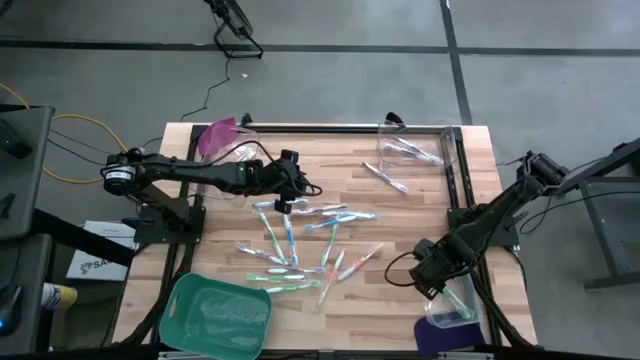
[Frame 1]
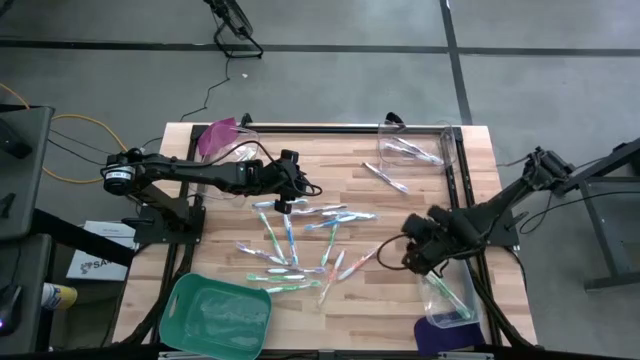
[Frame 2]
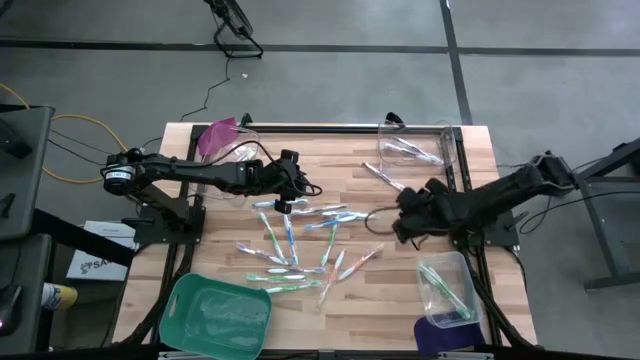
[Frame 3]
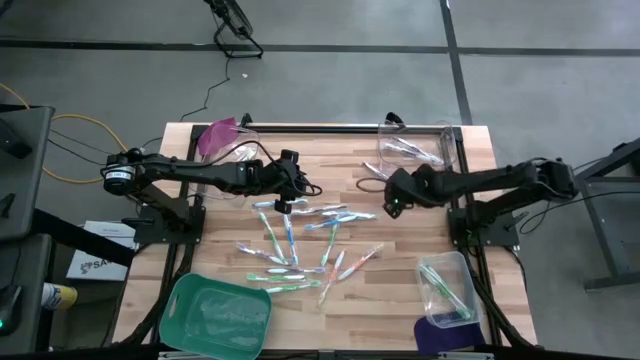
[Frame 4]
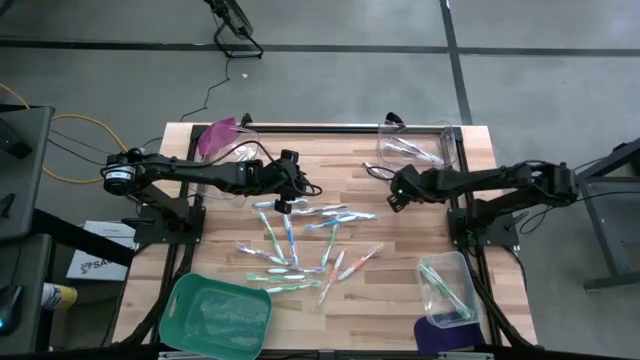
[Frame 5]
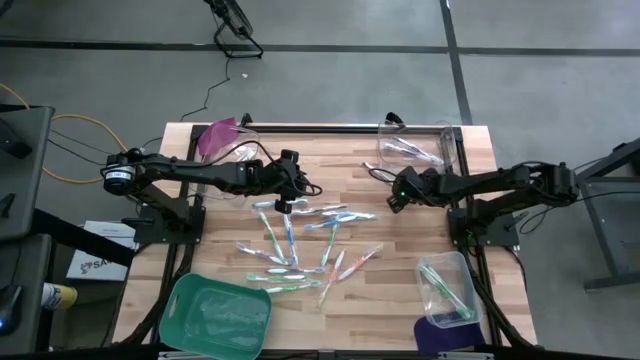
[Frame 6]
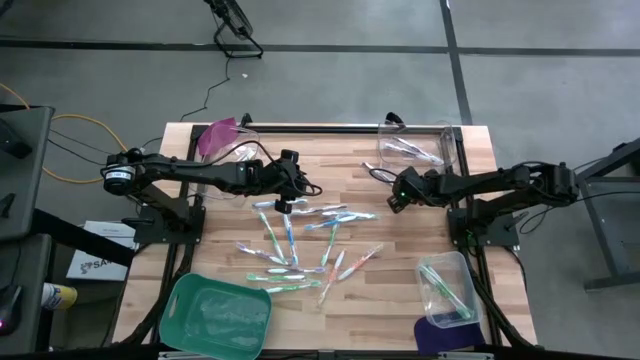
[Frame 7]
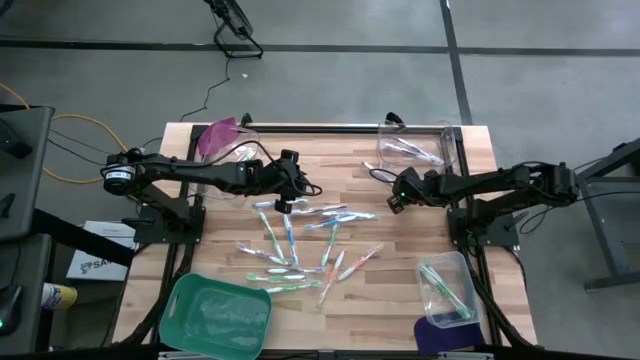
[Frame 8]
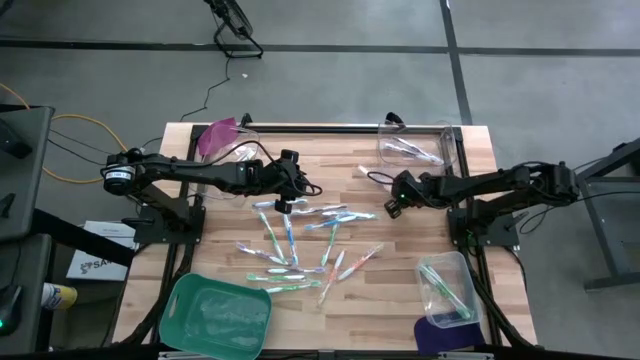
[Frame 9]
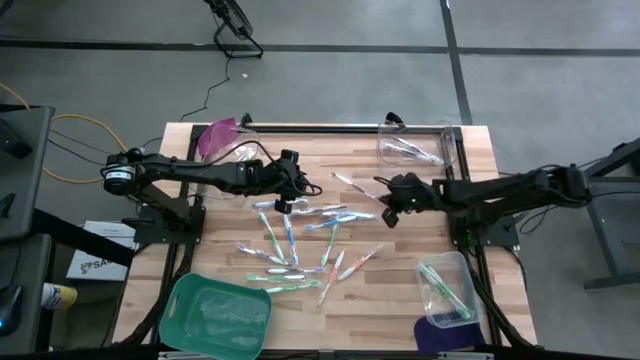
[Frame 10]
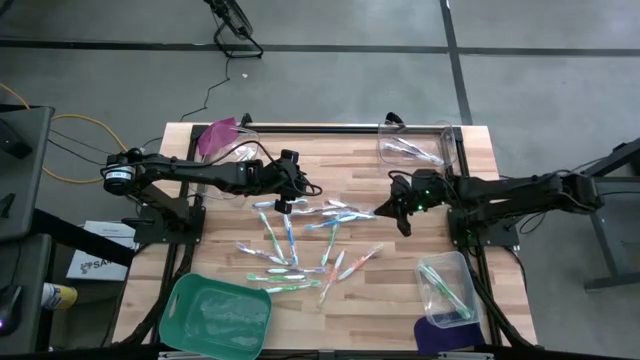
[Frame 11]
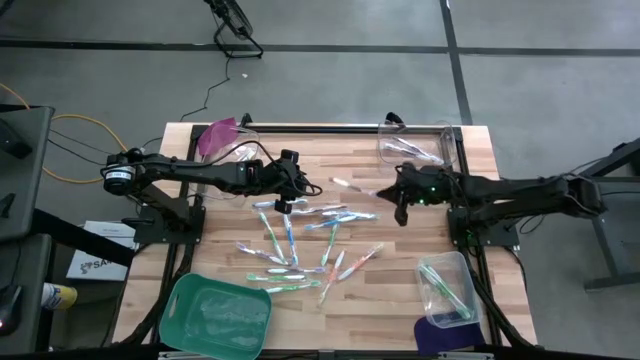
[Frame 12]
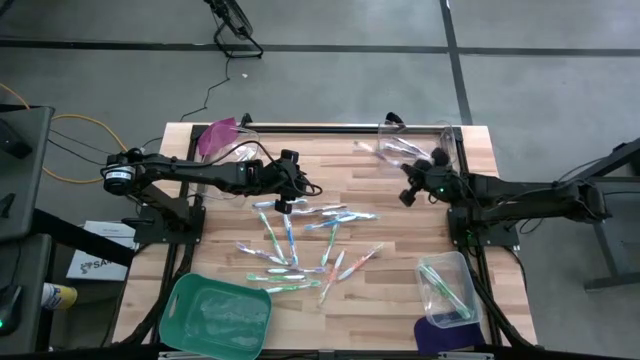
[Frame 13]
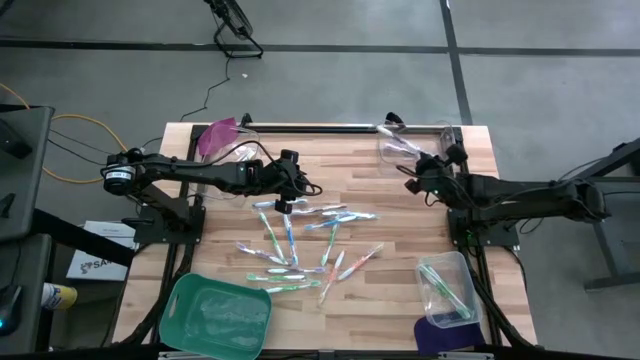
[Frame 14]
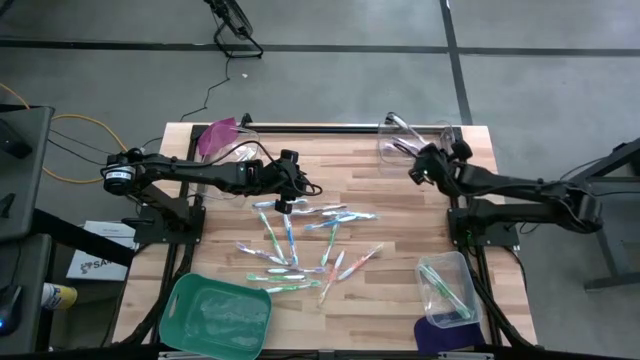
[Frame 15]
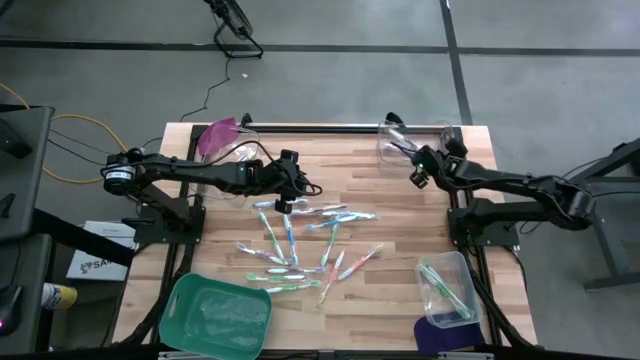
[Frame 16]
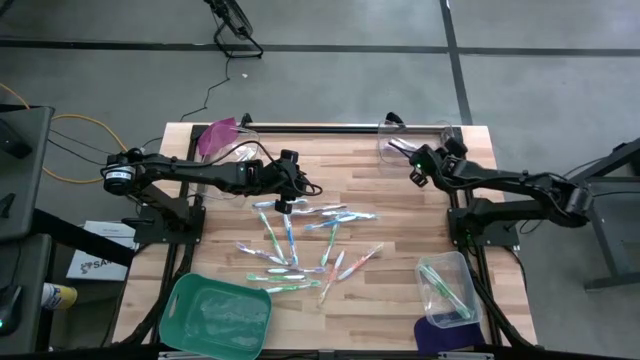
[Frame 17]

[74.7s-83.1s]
Task: Pick & Place Toothbrushes
Put the purple toothbrush into the right transparent bin

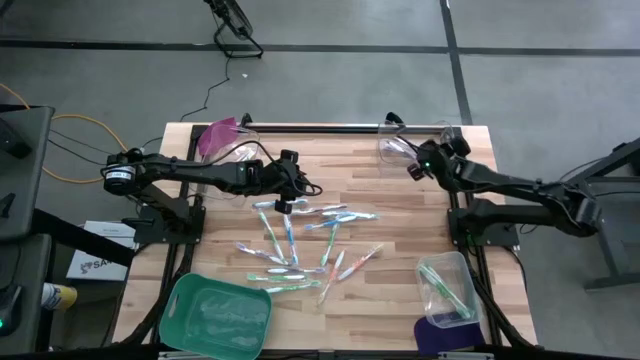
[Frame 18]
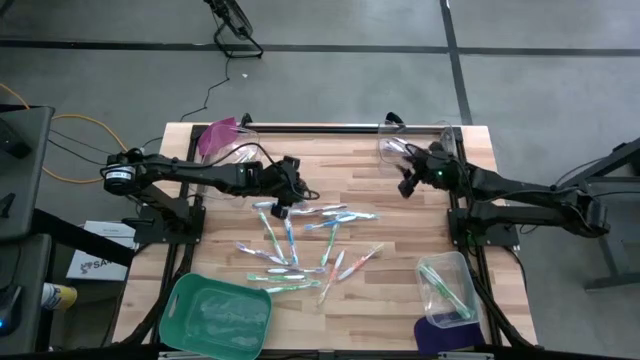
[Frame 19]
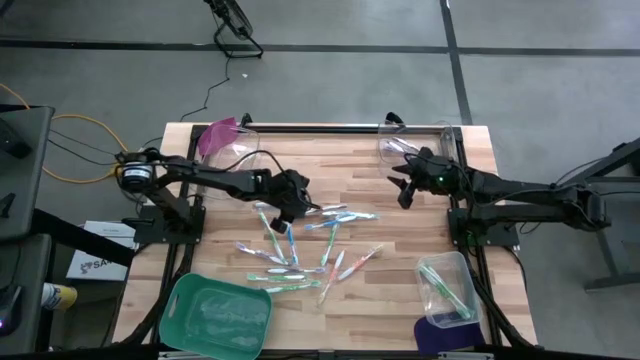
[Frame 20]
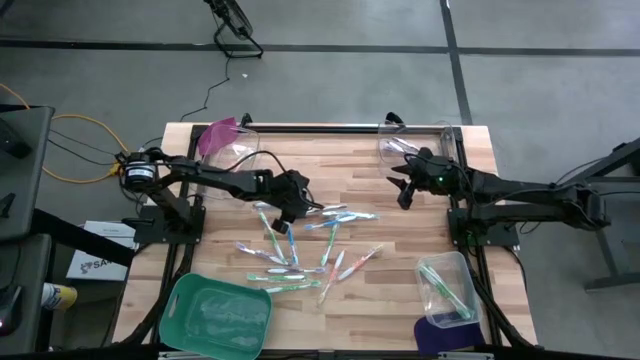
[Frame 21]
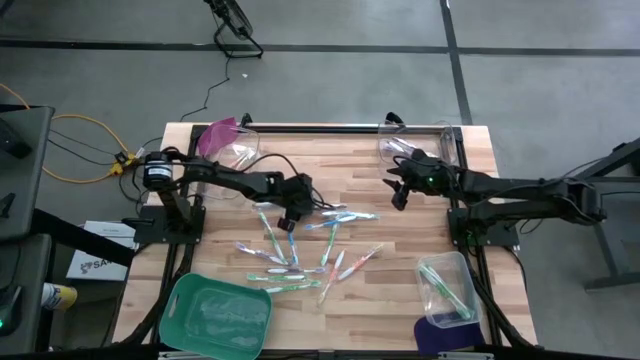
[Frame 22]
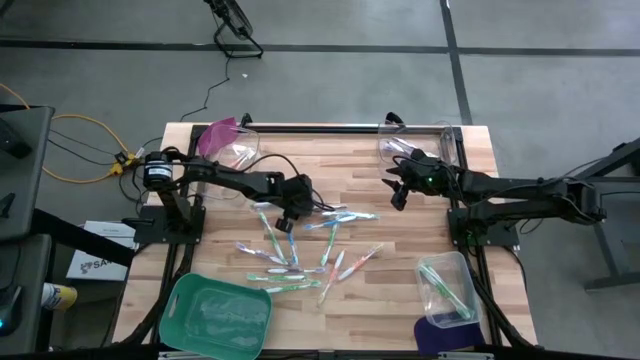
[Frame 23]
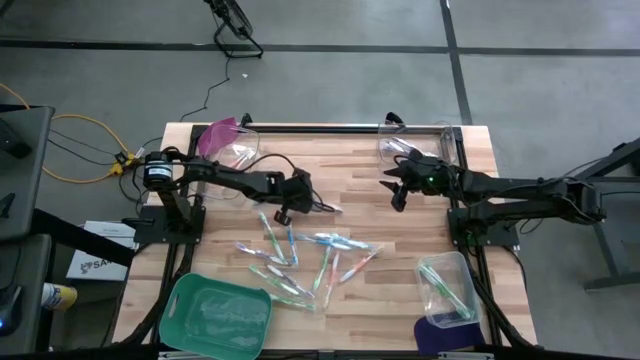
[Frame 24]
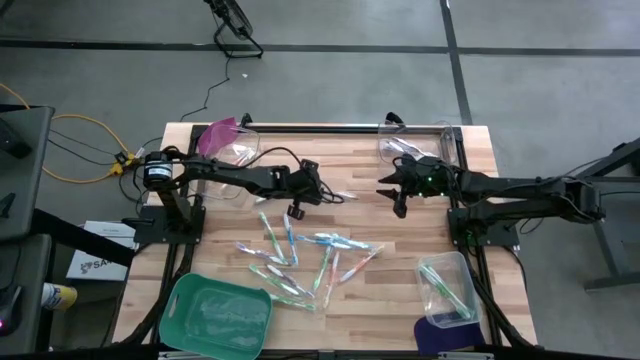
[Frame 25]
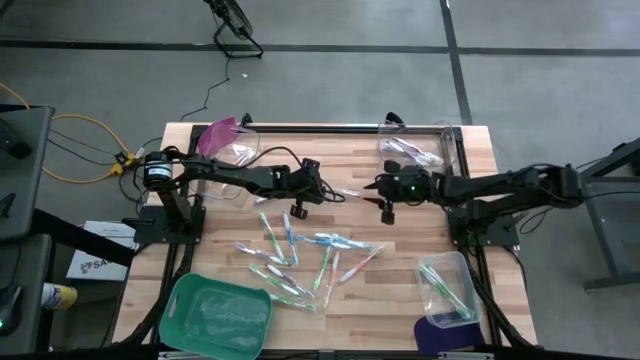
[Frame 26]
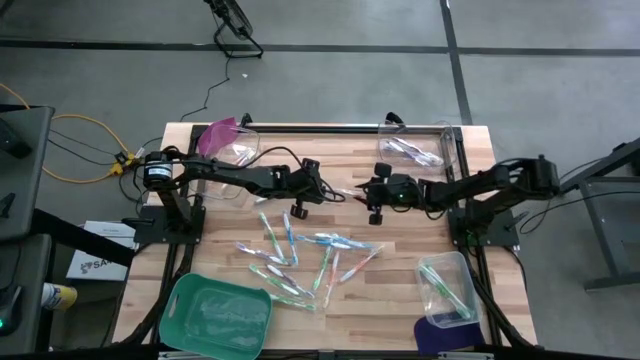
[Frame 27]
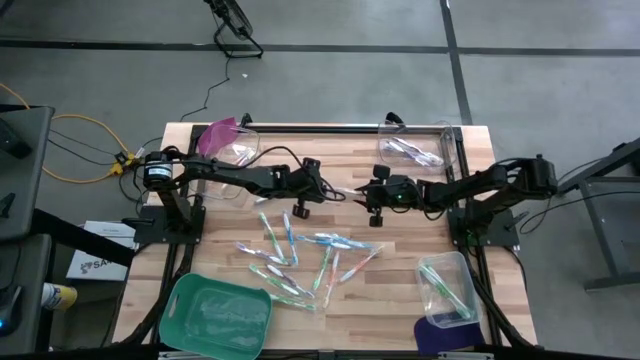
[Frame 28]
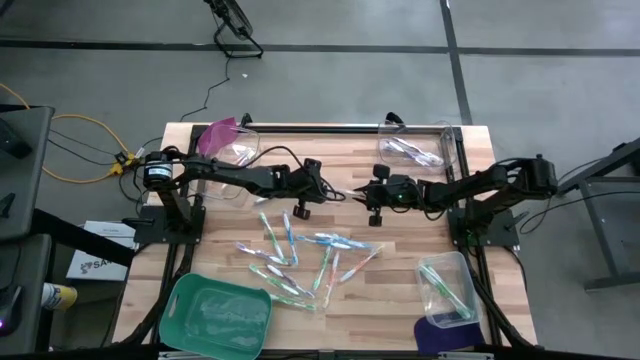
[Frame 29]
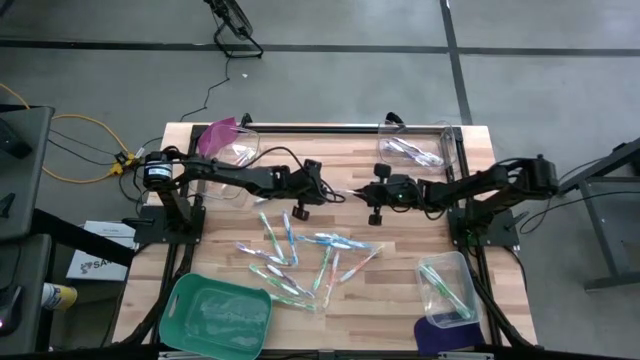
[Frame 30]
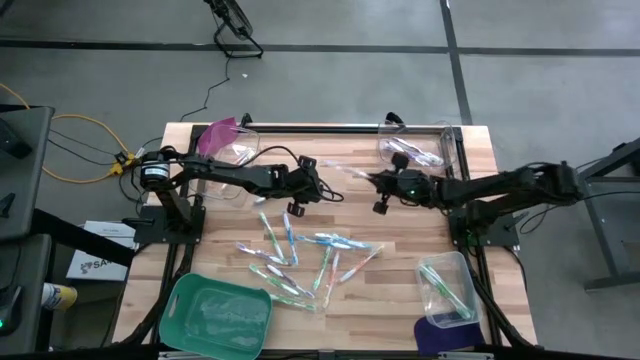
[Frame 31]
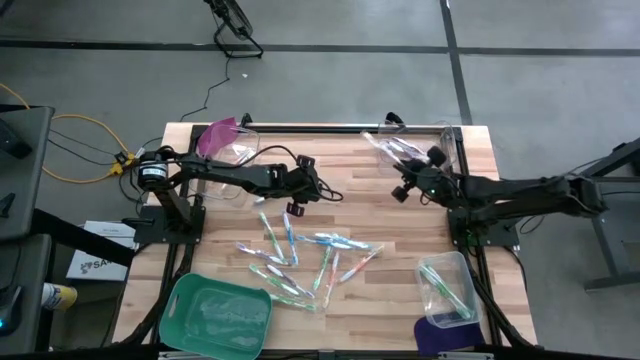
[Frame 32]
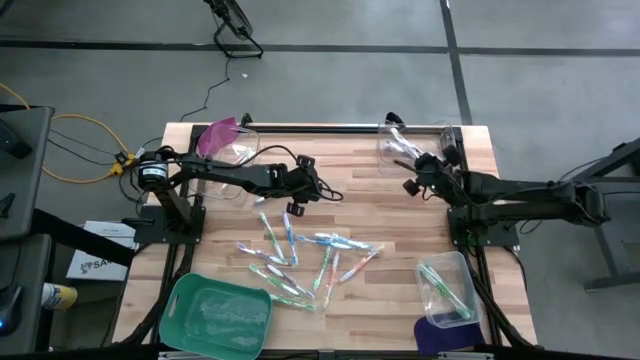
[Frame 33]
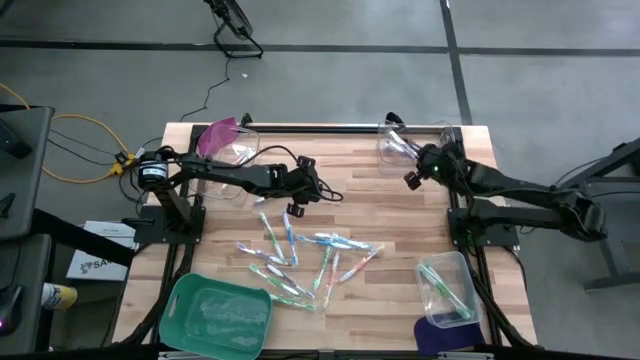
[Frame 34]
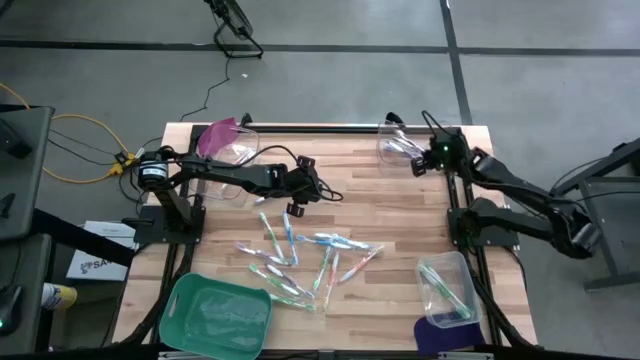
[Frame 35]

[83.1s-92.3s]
Put the purple toothbrush into the right transparent bin

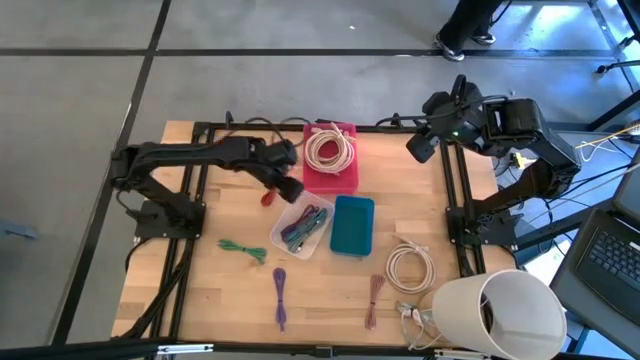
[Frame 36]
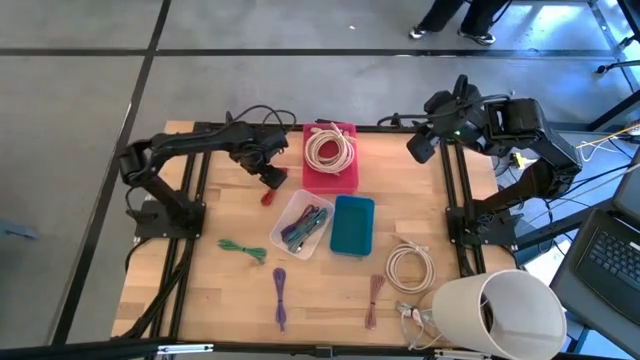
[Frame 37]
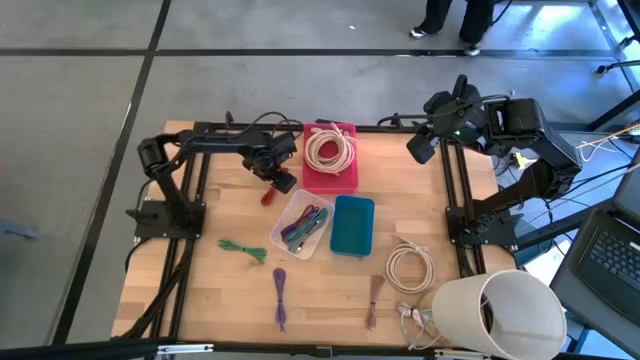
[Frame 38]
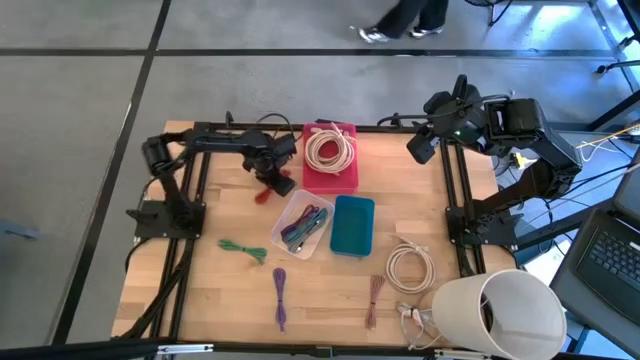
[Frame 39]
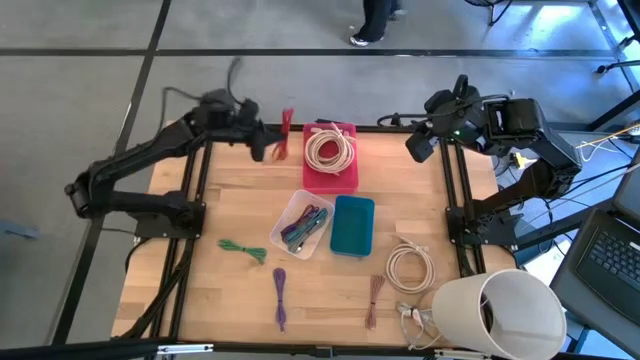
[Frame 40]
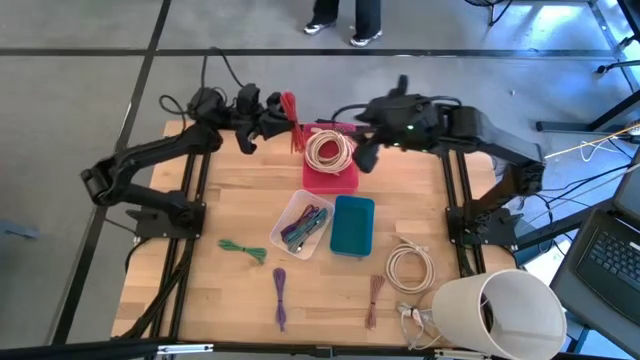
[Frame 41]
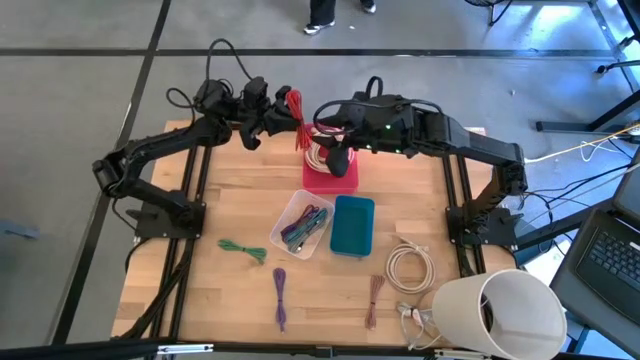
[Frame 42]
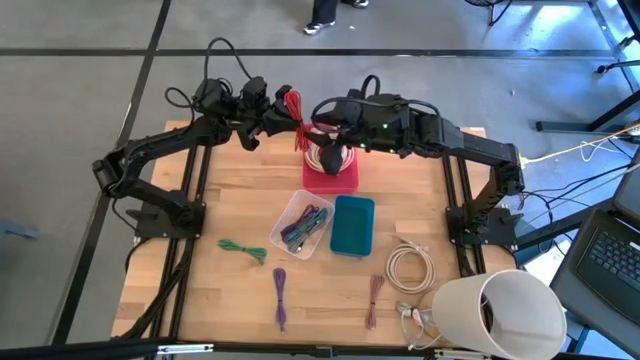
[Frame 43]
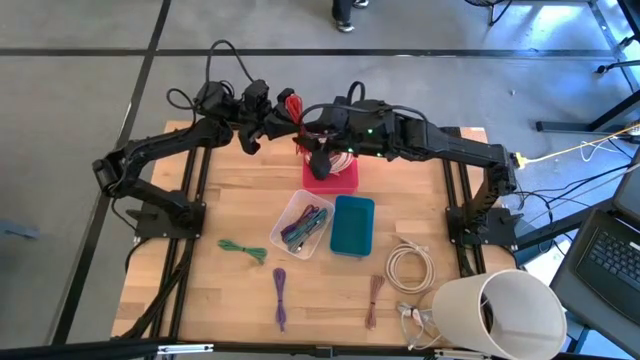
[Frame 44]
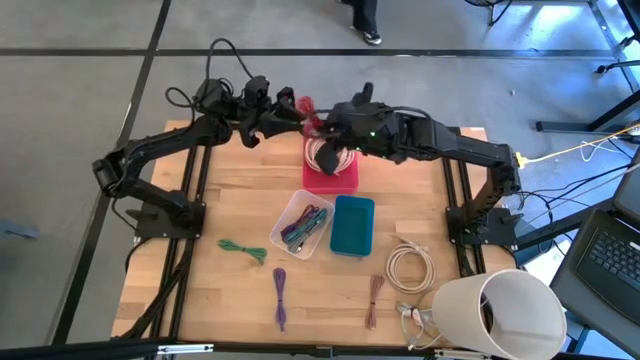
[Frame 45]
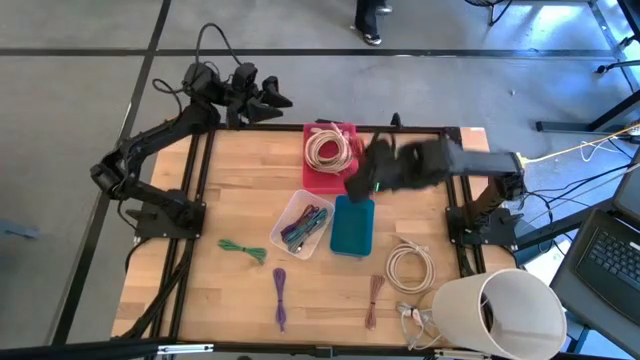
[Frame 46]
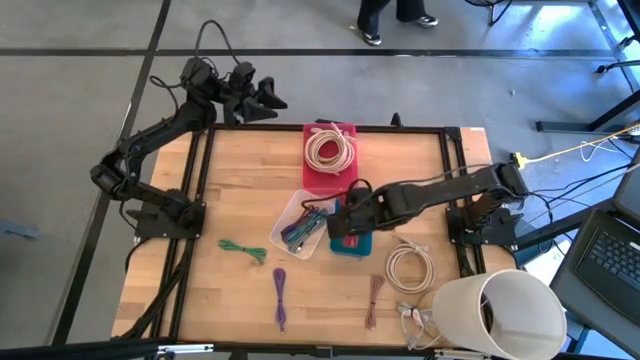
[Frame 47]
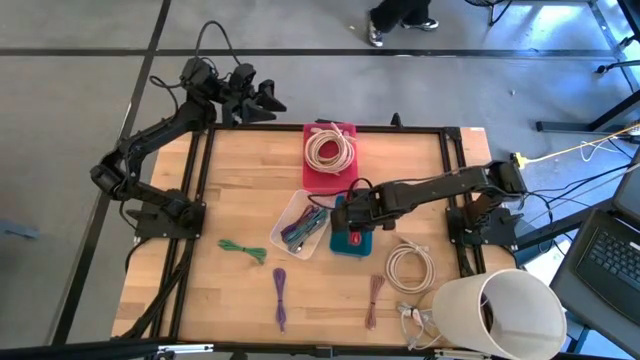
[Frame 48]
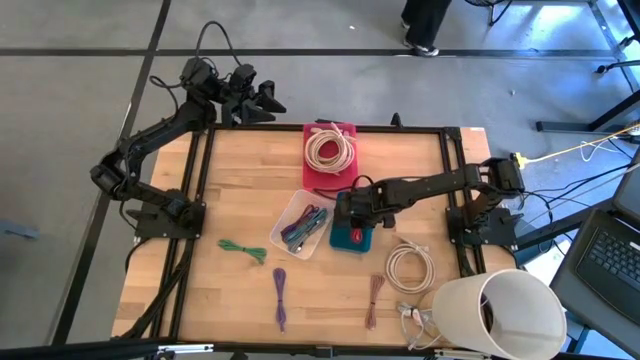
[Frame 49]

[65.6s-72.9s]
Task: Pick & Place USB Port
Put the red charger cable into the blue bin
